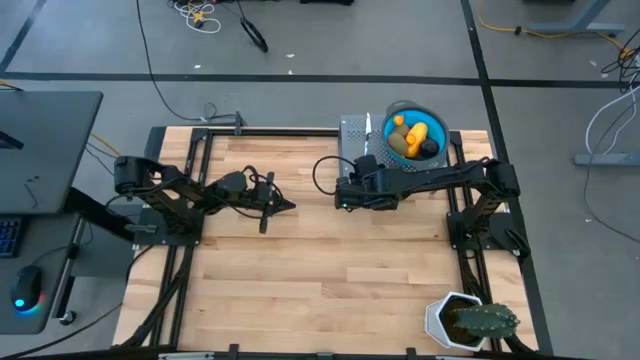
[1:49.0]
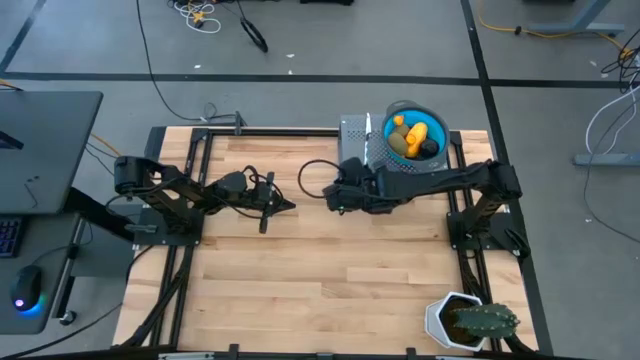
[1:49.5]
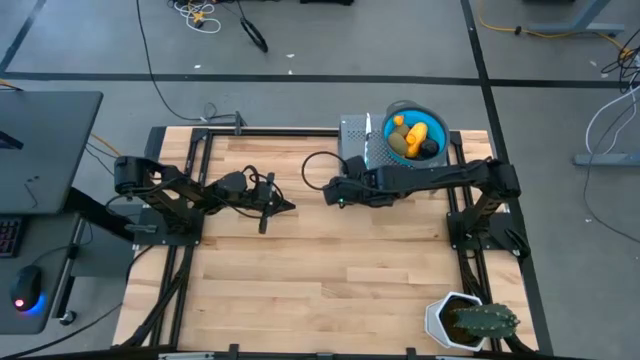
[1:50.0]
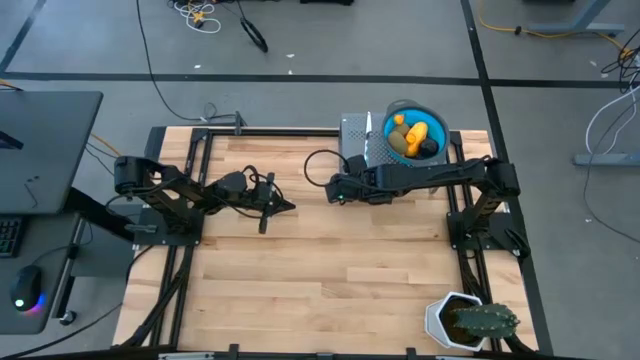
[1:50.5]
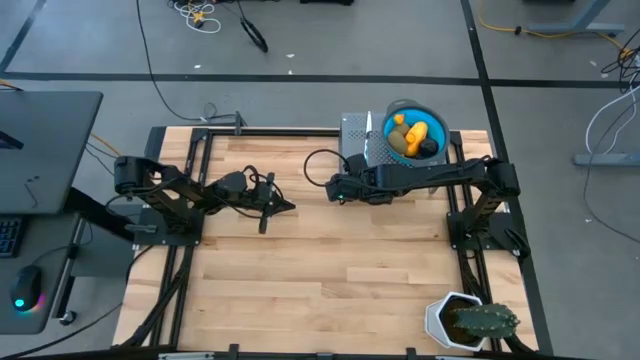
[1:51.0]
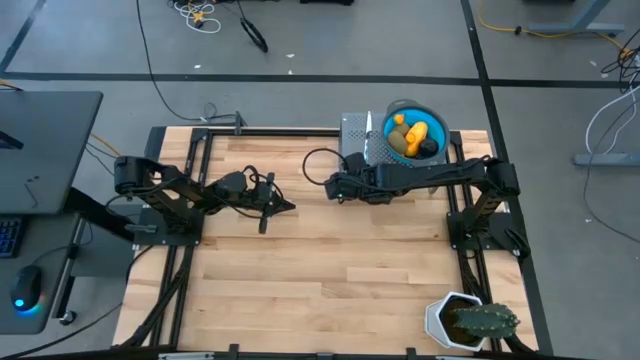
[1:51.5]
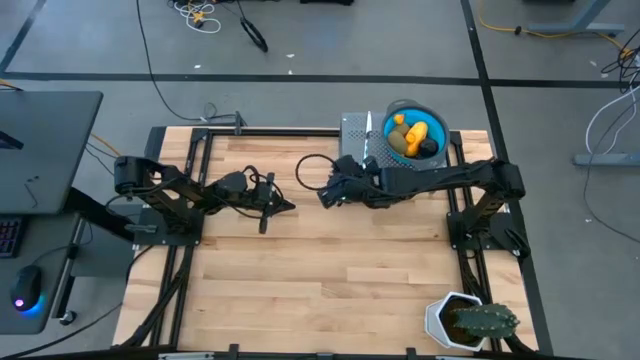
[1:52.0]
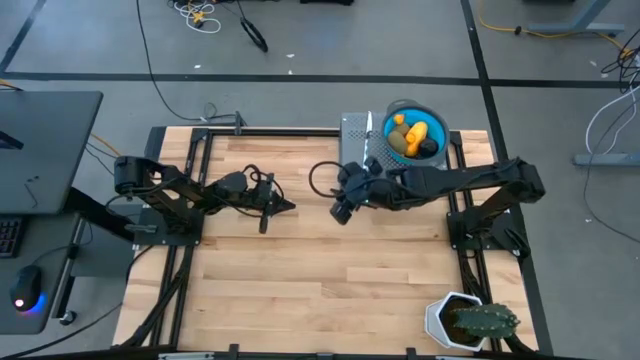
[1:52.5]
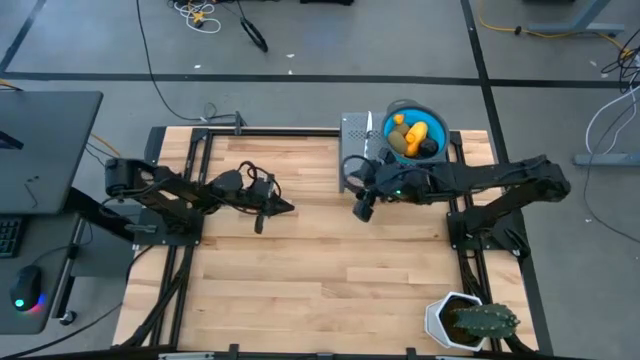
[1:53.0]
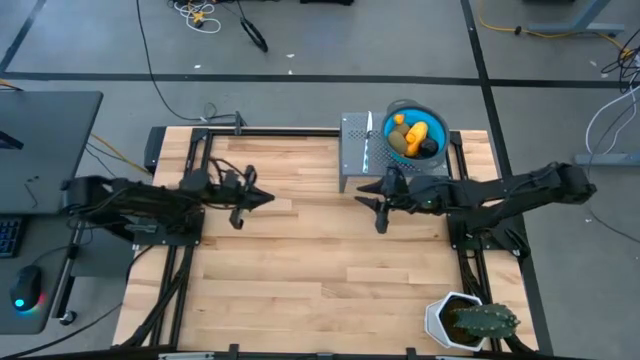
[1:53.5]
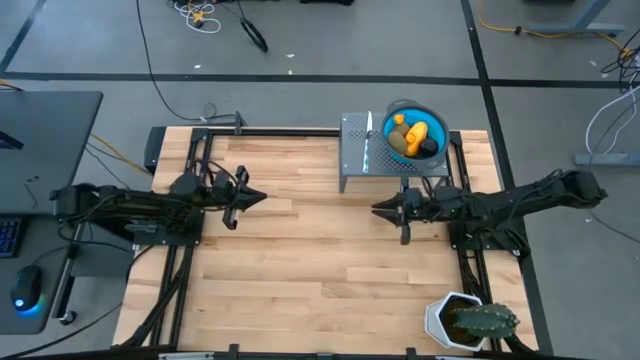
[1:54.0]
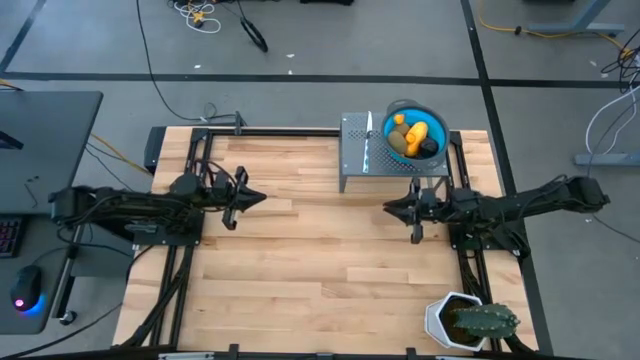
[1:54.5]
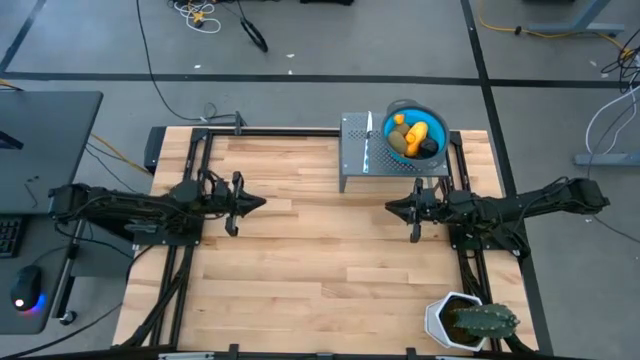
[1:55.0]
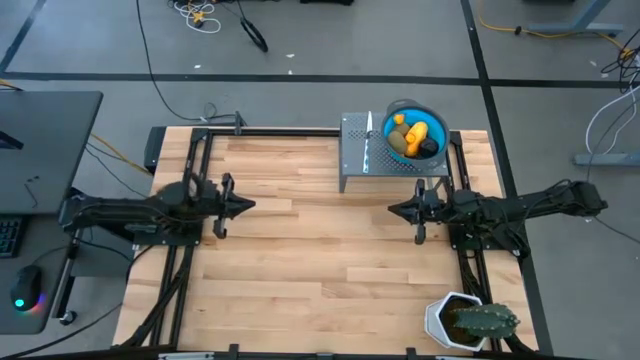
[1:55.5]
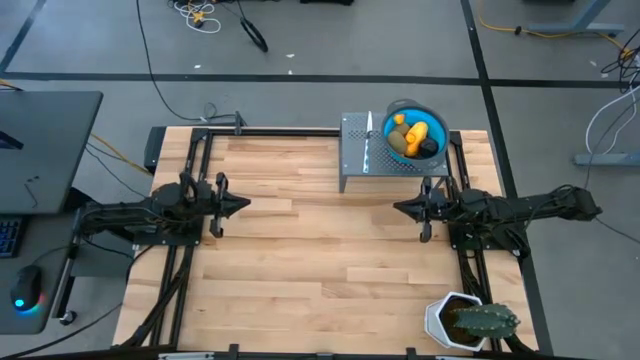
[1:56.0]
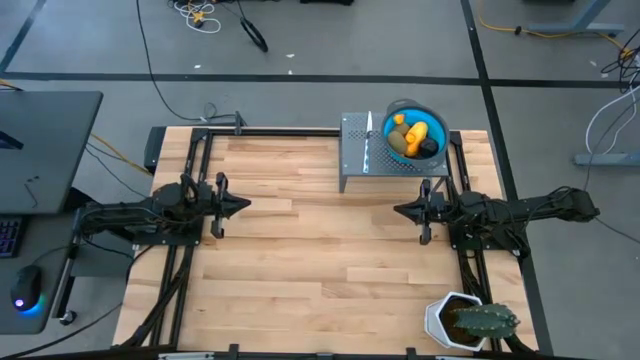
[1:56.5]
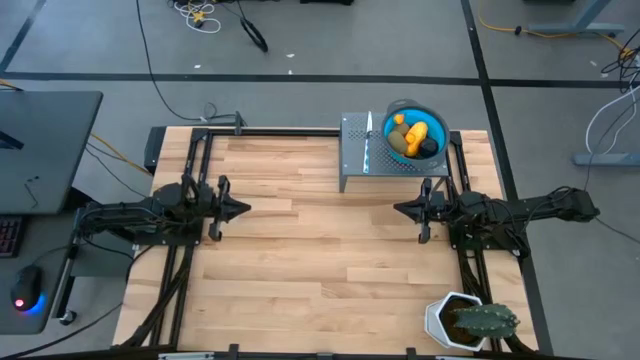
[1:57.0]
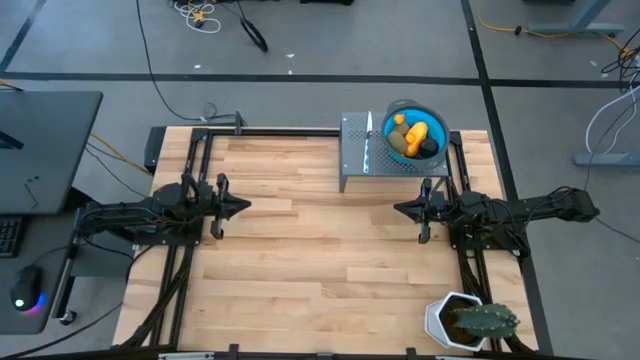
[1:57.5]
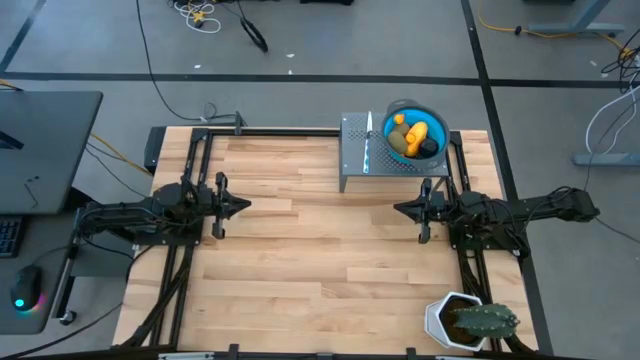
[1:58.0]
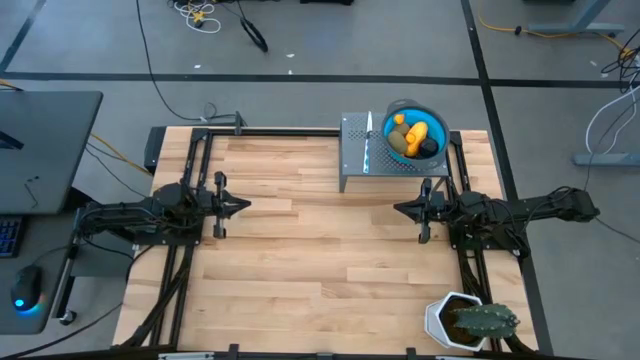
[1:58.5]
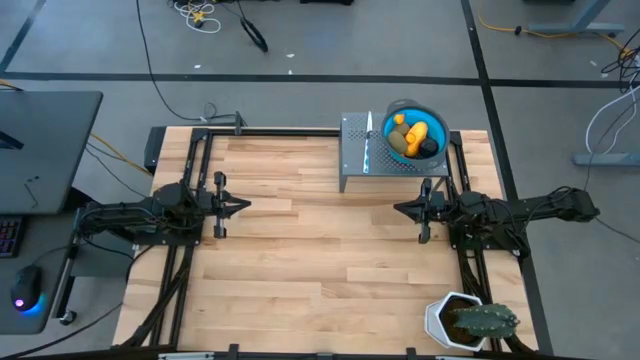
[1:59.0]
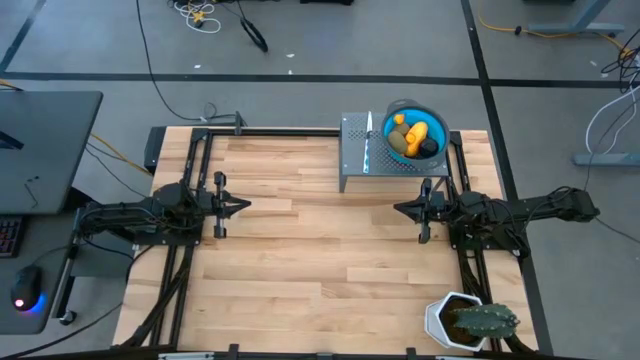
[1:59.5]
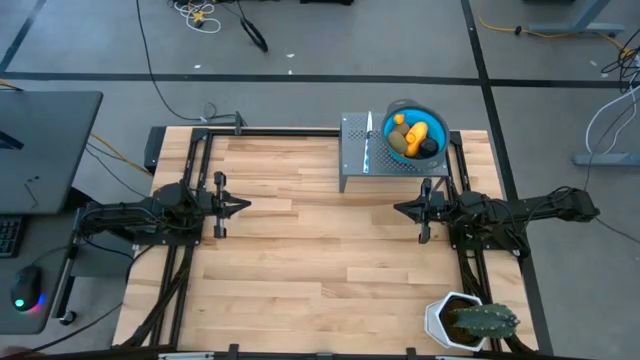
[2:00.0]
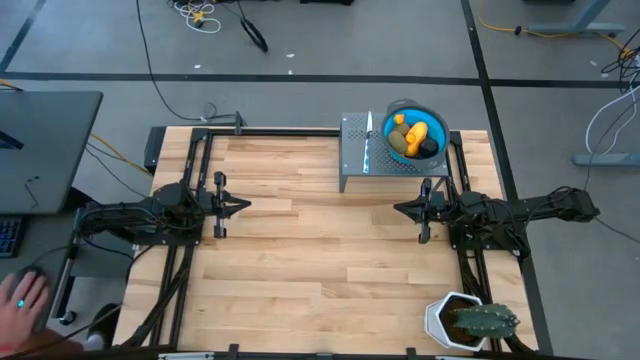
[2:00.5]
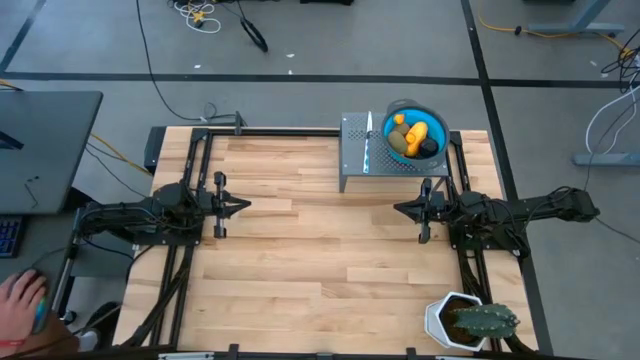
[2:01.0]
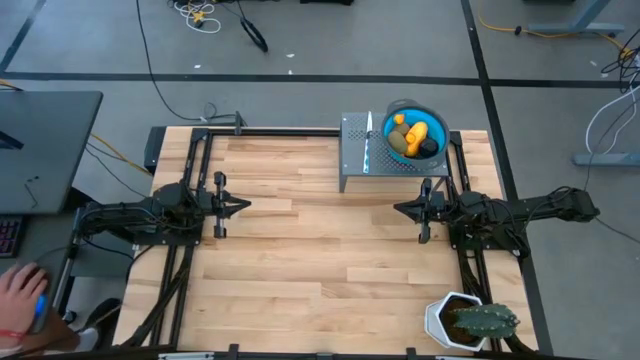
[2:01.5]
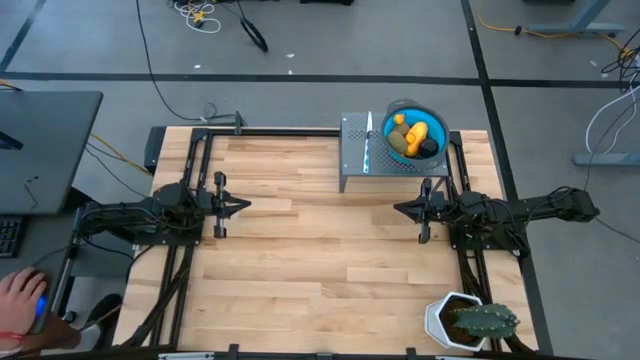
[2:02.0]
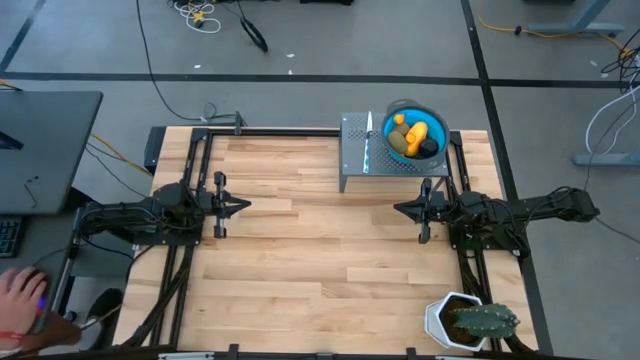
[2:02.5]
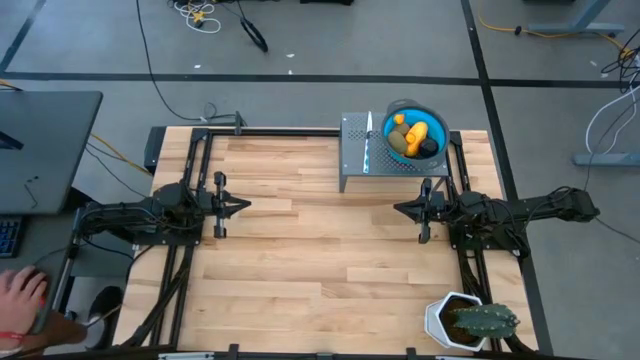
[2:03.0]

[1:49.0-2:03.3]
Task: Pick & Place Fruit
Return to Home Position

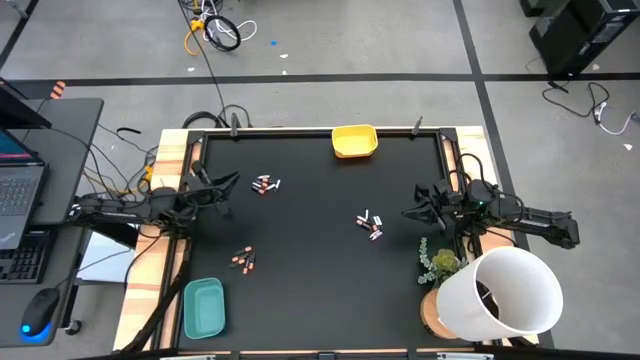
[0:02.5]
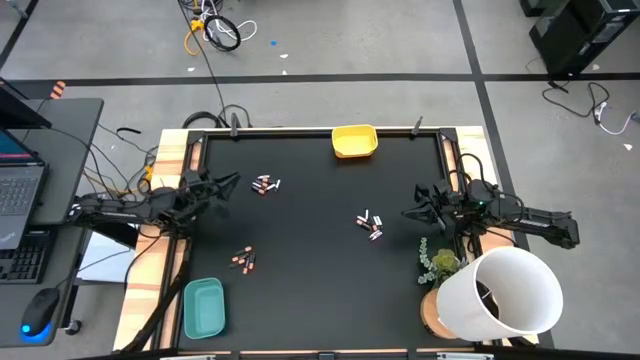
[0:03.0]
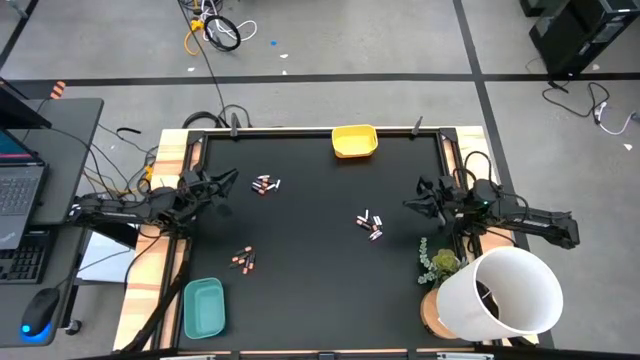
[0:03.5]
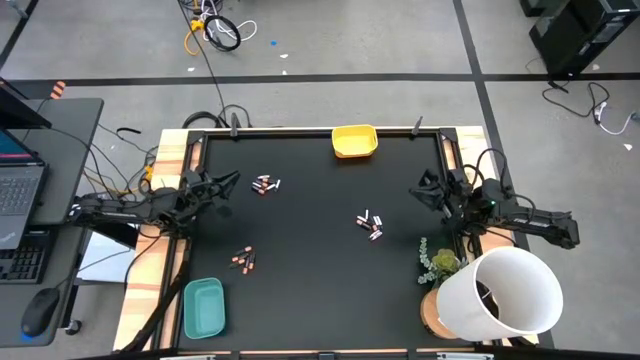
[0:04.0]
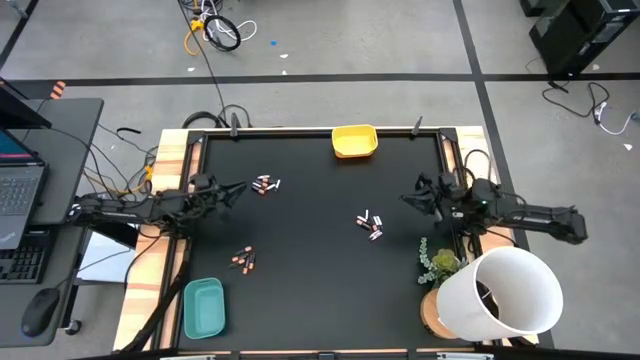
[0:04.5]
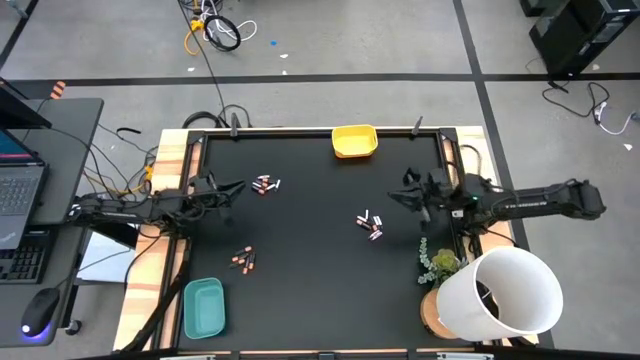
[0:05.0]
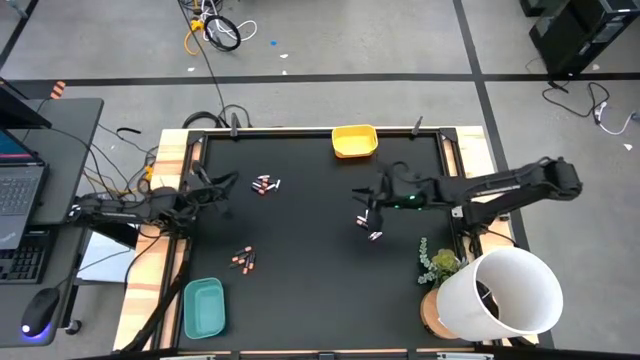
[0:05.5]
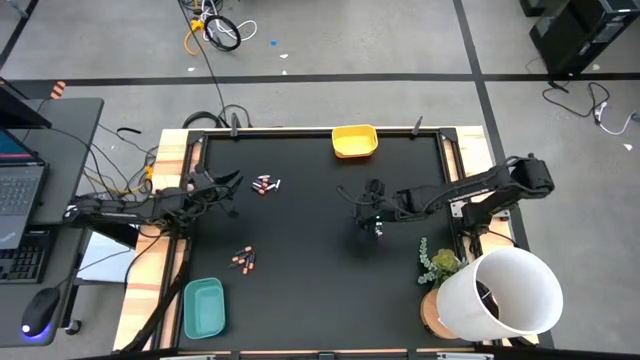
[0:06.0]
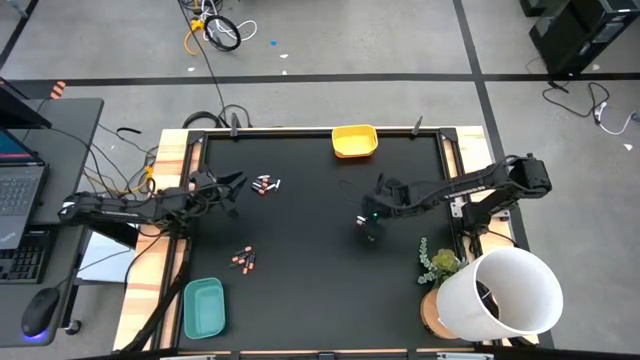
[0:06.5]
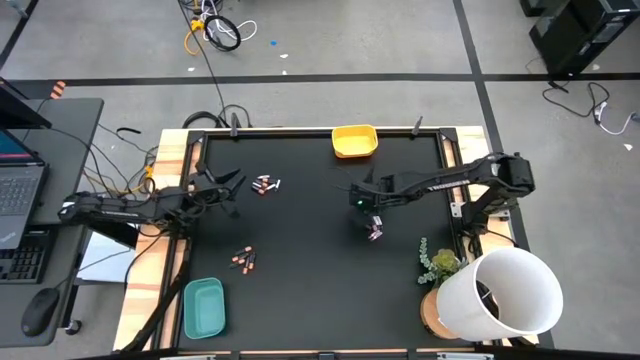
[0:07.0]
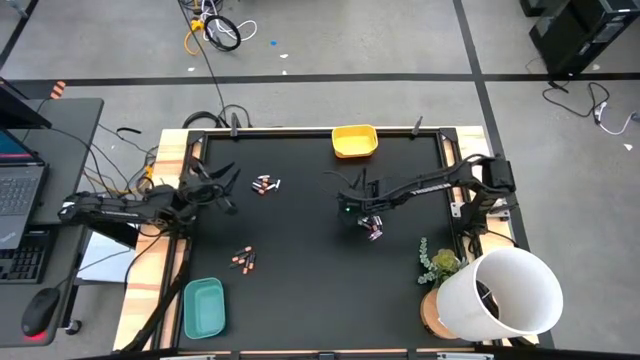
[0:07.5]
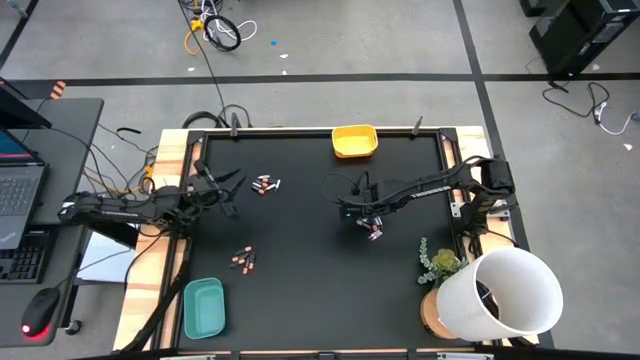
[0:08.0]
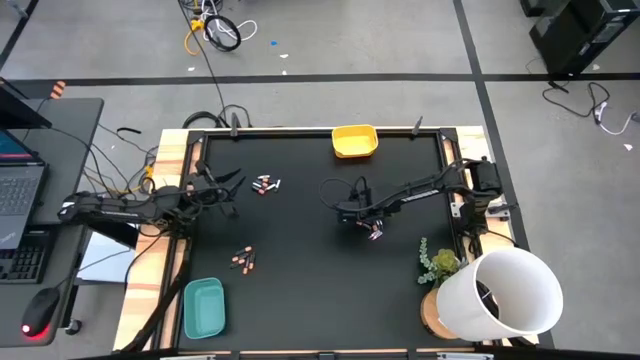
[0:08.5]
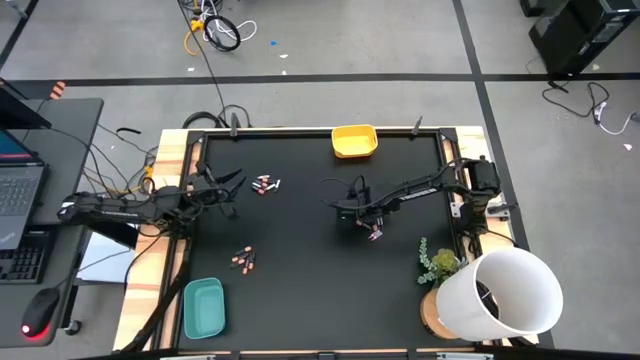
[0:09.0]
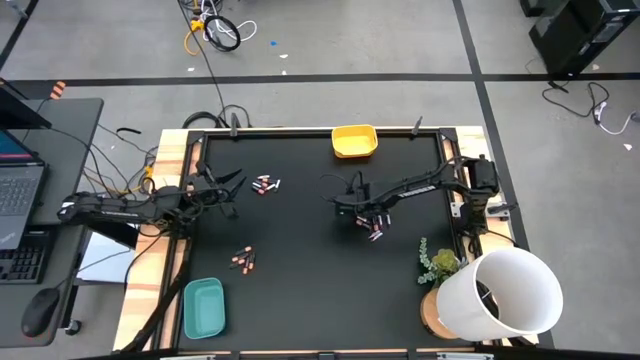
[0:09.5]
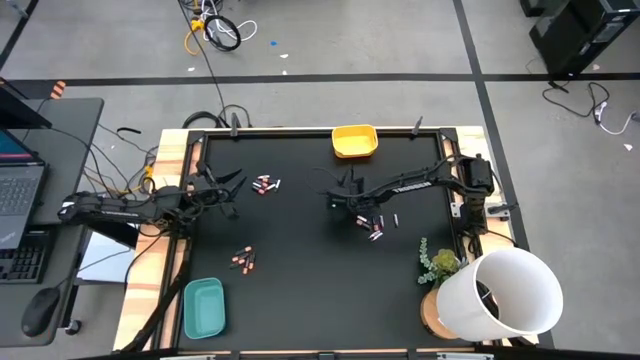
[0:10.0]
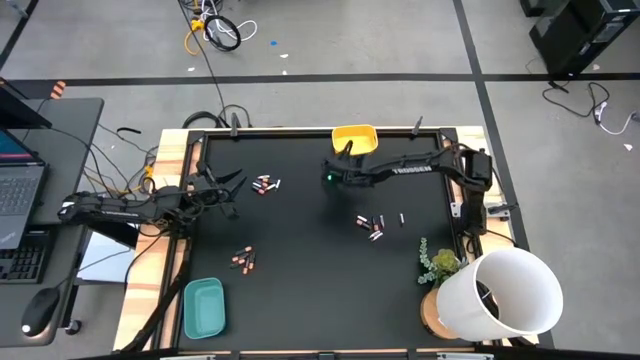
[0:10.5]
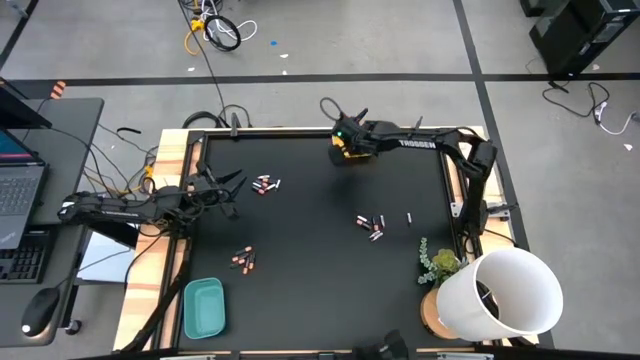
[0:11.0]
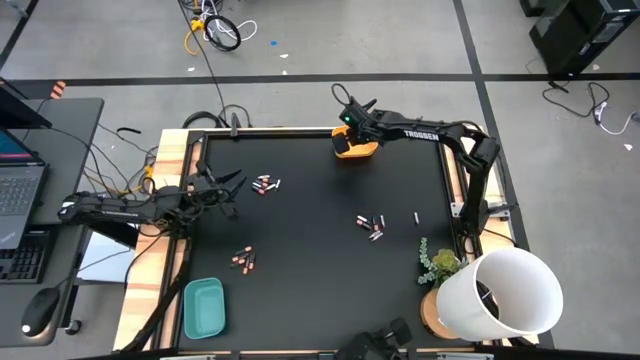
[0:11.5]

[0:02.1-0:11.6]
Task: Sort batteries
Put the silver battery into the yellow bin
